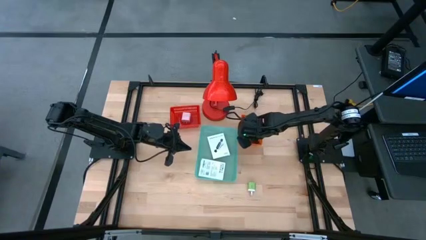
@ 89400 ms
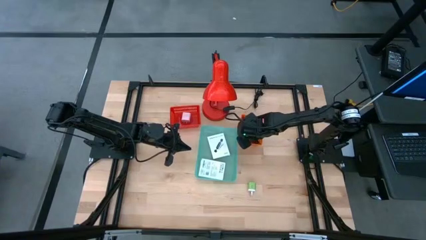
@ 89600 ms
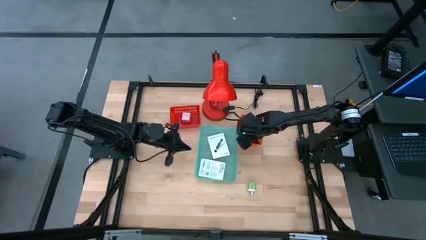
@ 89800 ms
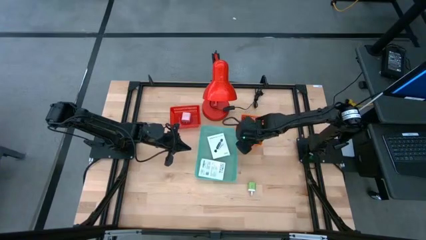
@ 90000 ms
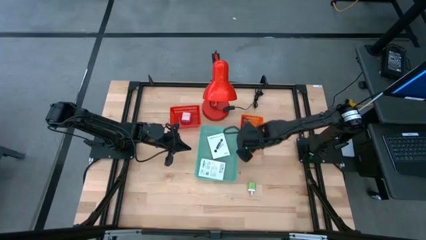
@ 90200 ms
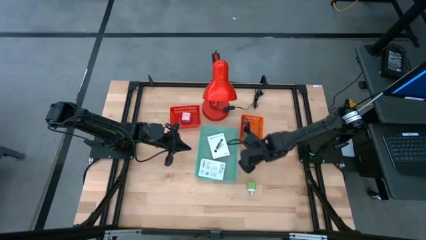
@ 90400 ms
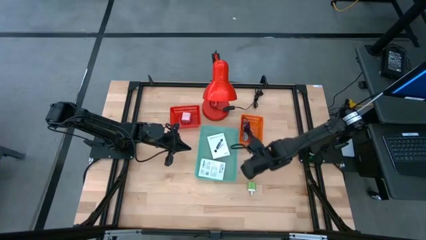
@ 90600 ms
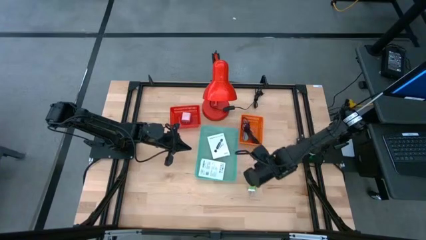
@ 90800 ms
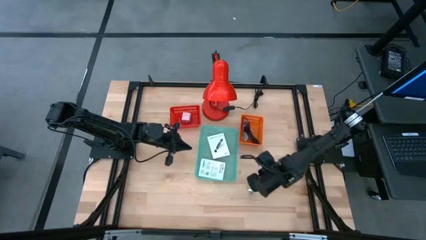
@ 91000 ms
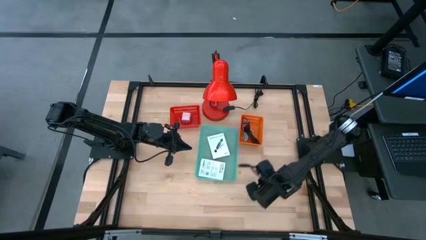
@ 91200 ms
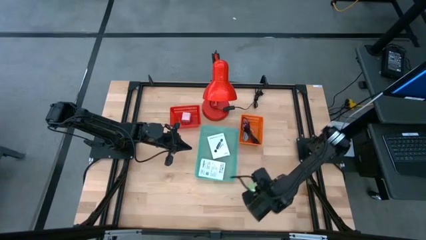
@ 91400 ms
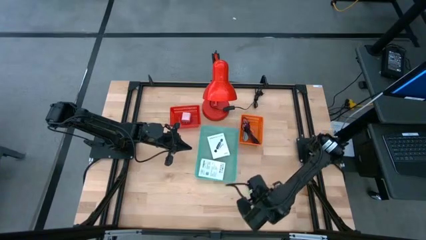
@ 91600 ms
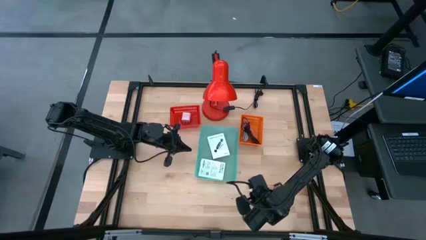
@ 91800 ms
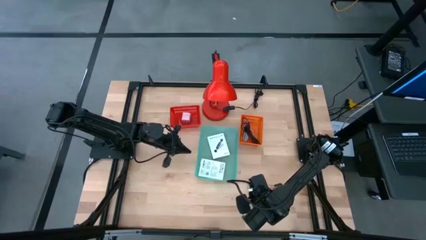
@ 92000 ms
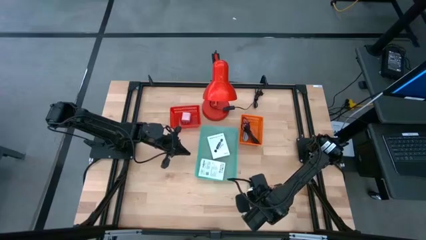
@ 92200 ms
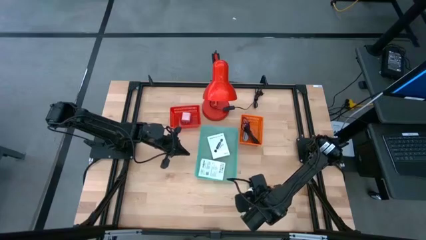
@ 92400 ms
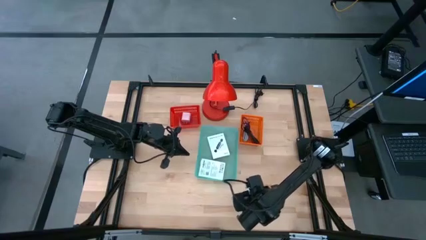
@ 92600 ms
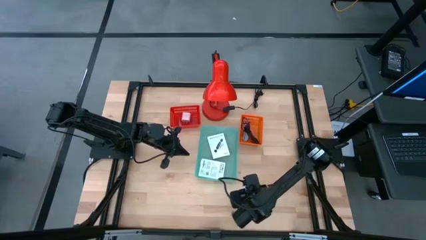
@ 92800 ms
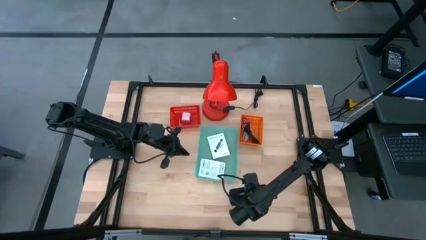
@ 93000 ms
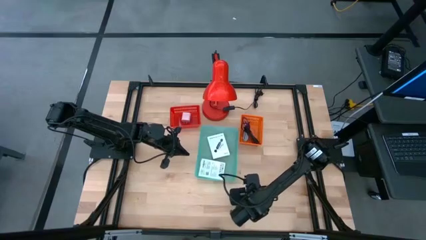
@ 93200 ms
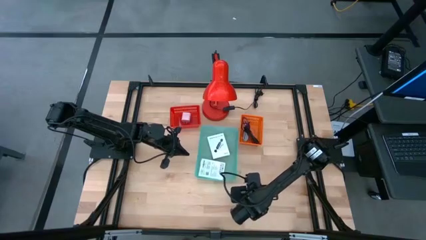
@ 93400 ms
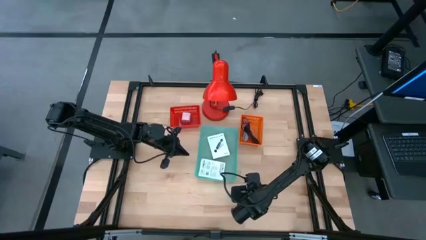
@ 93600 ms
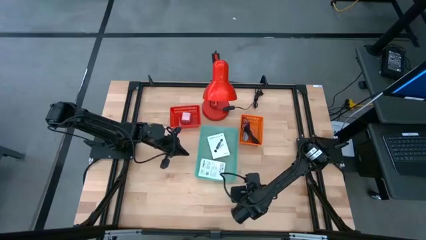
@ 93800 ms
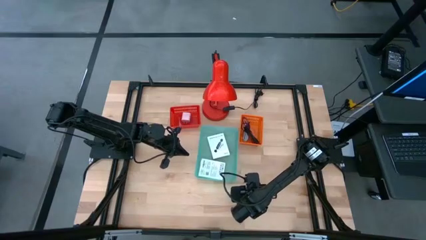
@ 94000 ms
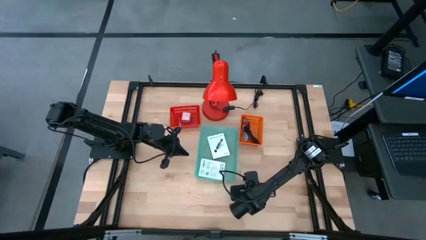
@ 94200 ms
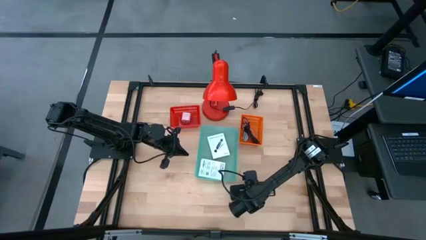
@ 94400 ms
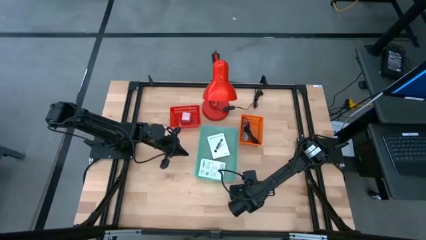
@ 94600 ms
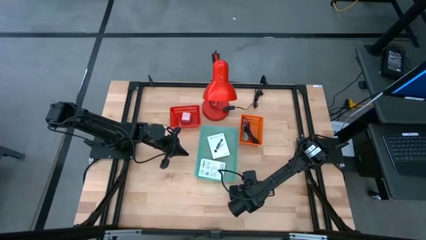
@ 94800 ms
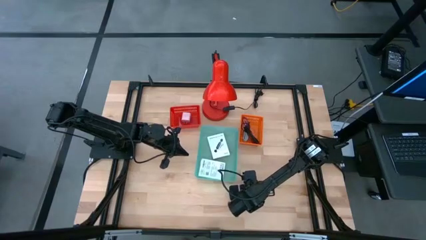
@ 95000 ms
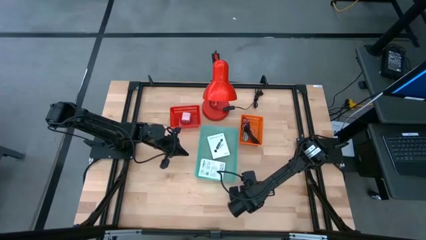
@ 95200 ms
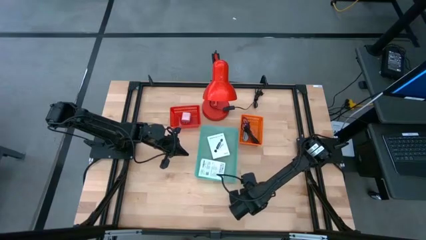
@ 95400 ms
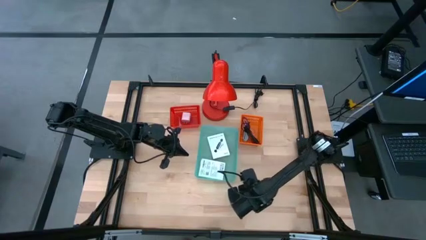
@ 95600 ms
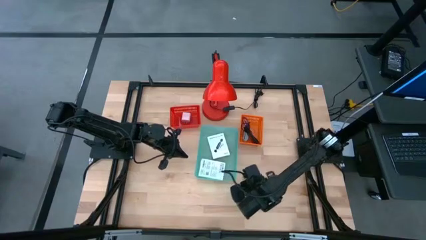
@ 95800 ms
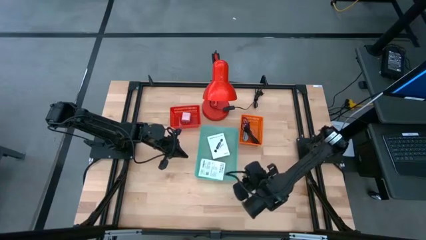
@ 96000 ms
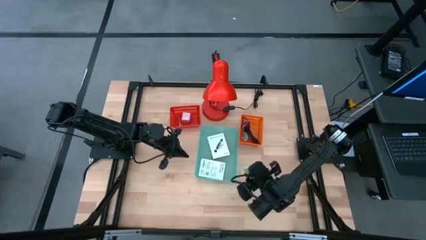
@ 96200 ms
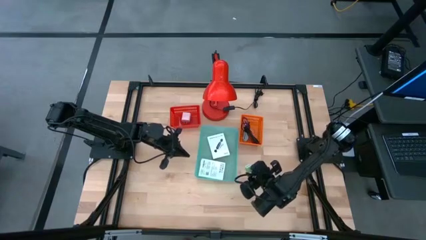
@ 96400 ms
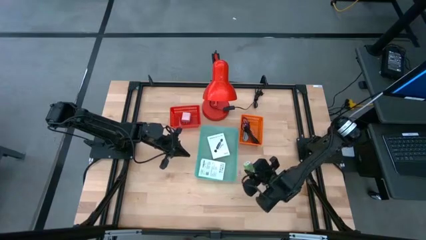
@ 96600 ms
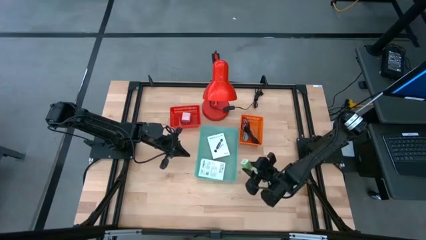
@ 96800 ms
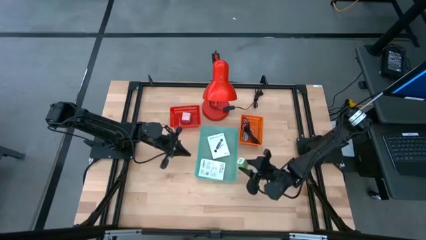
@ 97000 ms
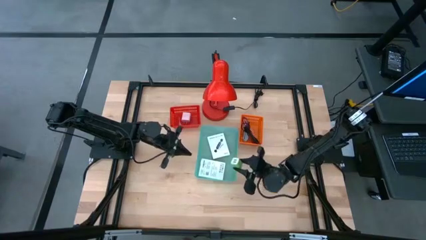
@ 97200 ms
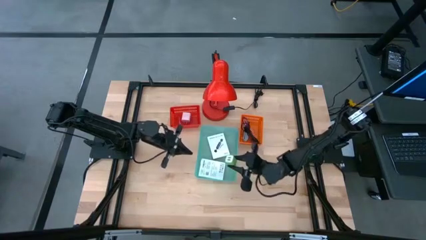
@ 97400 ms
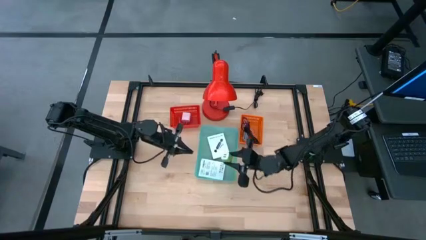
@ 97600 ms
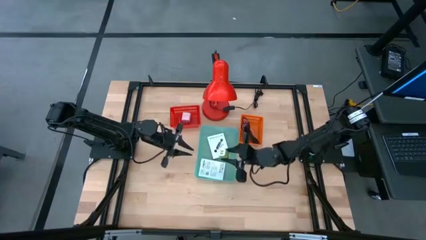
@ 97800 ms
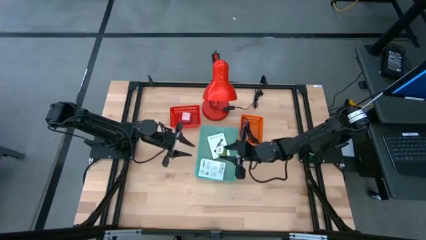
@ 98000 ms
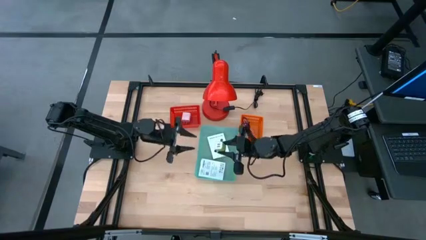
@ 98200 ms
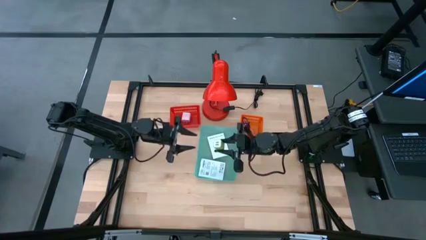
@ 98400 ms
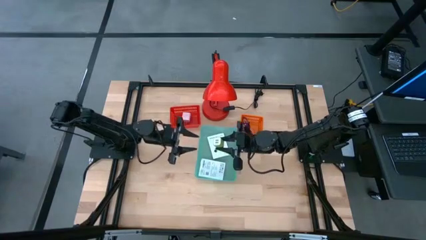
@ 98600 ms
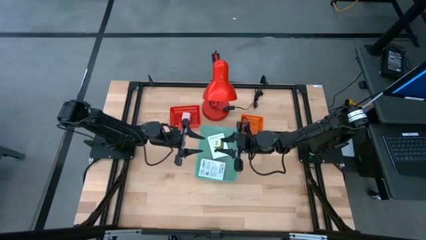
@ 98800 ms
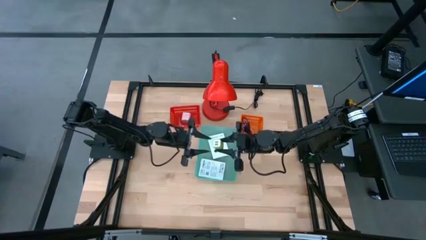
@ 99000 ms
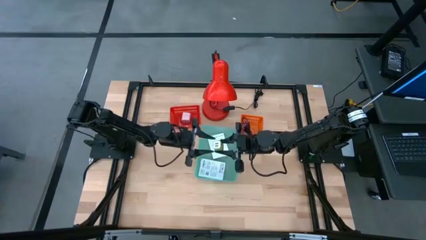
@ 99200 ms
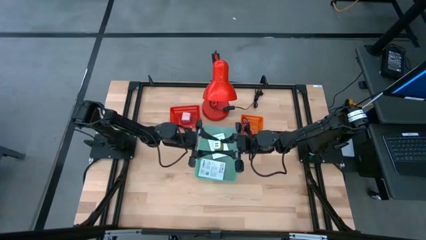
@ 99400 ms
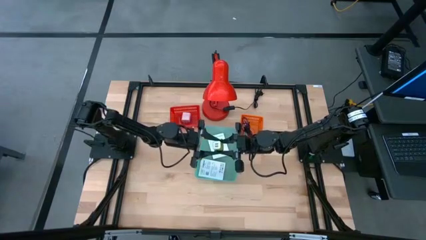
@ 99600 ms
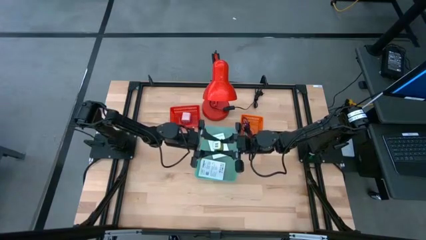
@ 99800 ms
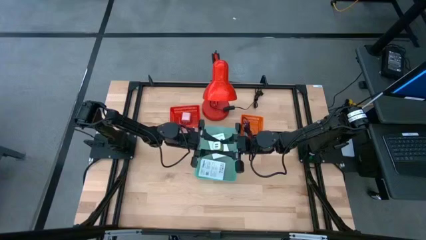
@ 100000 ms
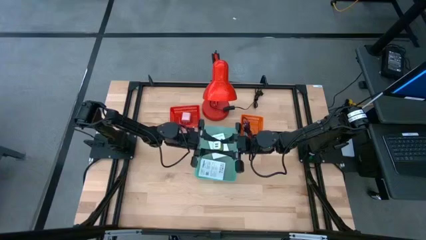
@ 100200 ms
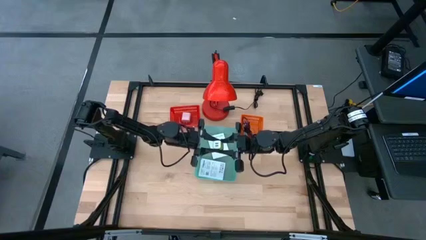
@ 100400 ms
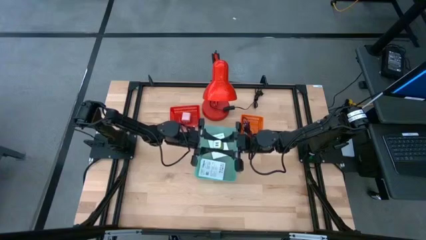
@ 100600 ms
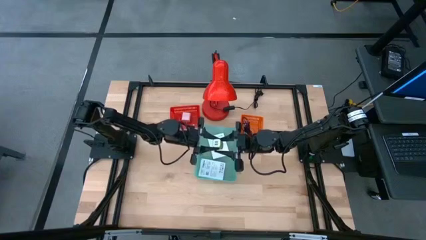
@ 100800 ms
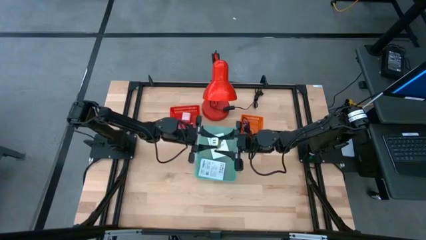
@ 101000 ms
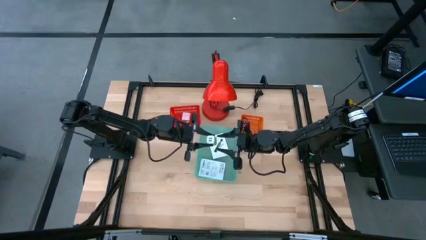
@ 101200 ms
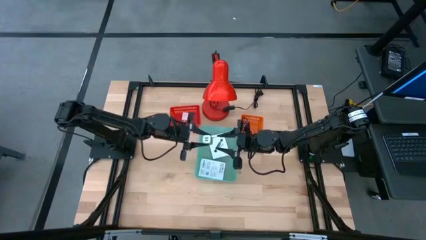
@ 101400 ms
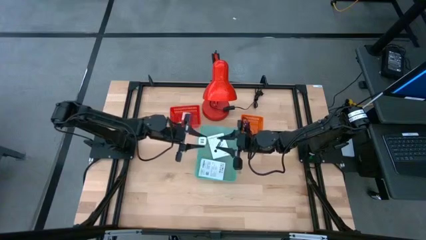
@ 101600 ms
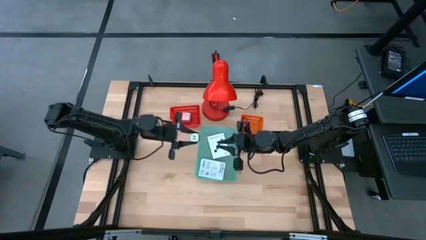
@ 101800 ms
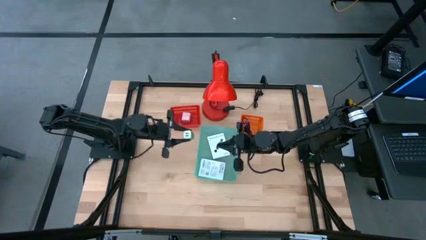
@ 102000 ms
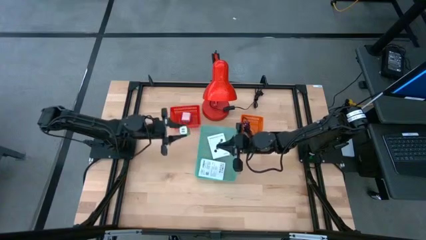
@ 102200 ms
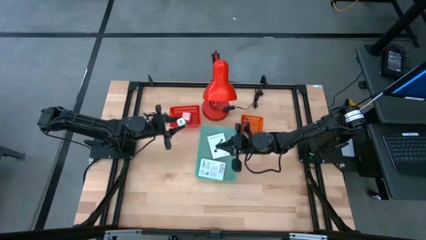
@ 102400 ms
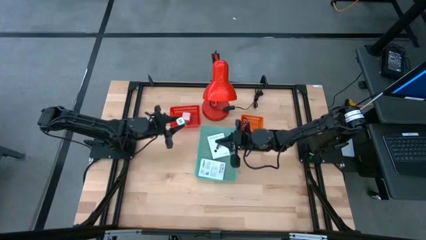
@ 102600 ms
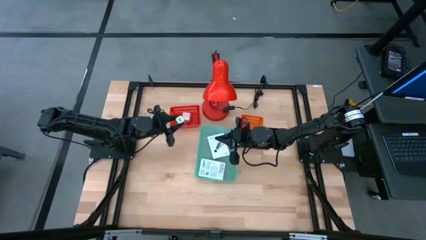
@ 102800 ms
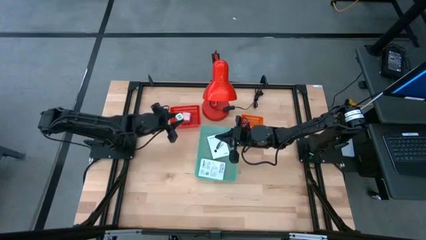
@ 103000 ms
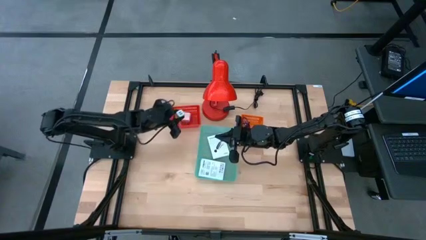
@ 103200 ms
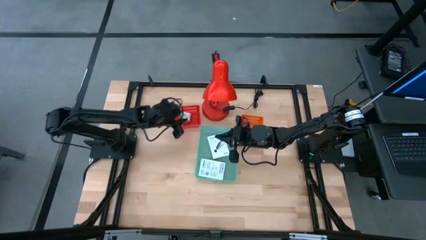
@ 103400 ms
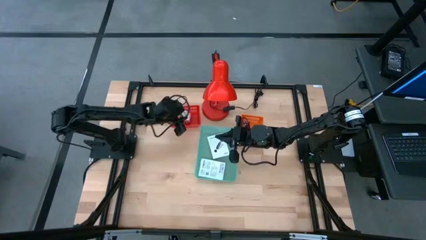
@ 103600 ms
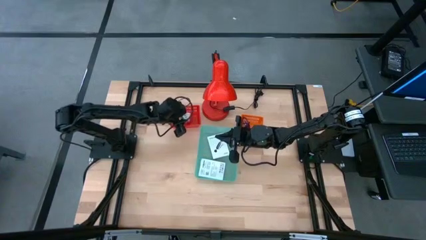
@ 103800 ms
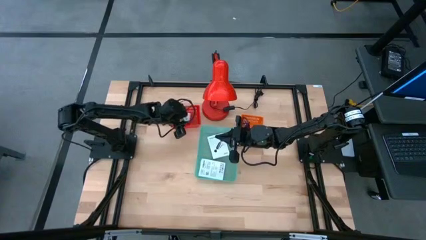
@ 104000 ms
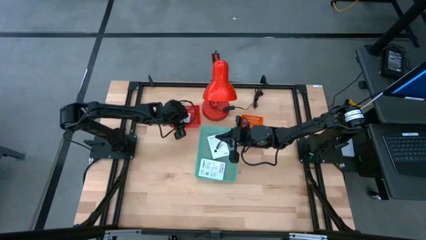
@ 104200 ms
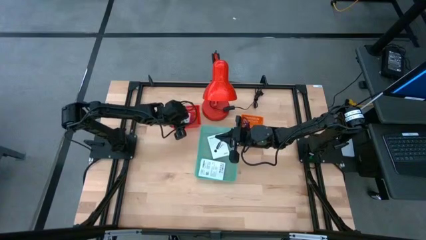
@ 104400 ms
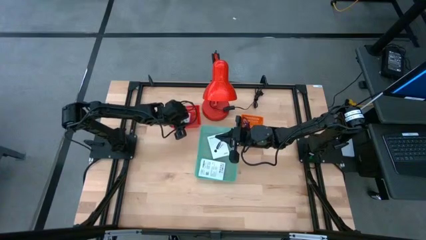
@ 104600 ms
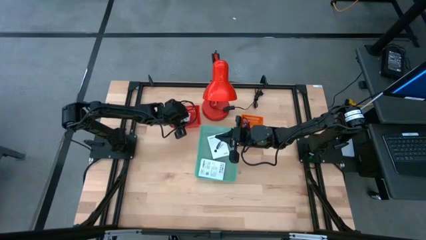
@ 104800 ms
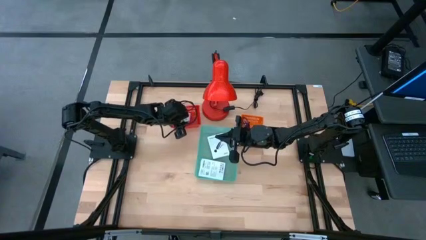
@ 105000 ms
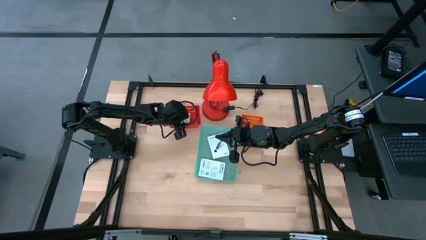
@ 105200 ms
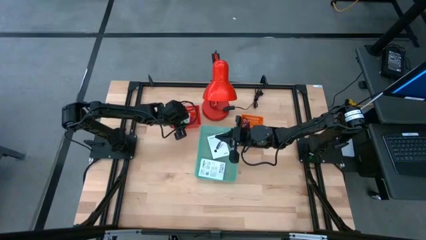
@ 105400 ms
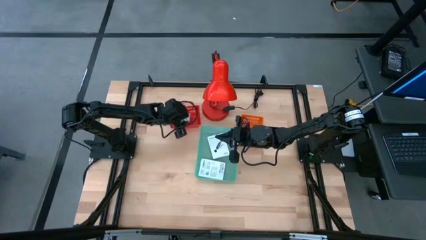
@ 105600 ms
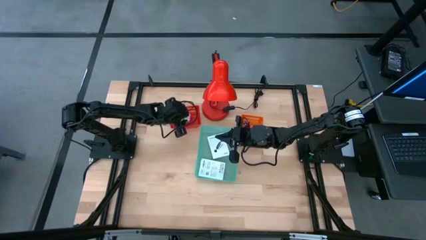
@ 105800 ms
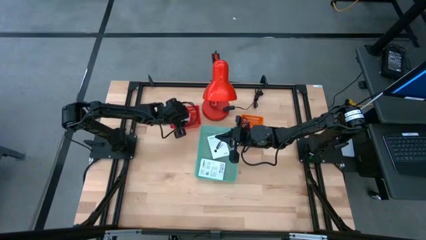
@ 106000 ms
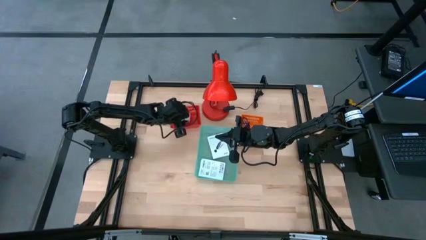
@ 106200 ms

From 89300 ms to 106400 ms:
Task: Pick and place items into bin
Put the green charger adapter into the red basket
